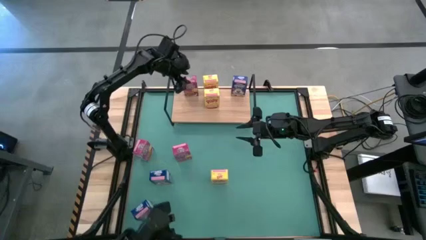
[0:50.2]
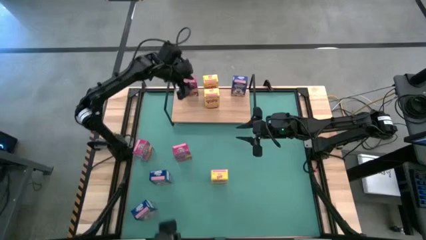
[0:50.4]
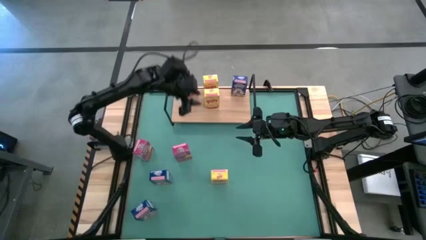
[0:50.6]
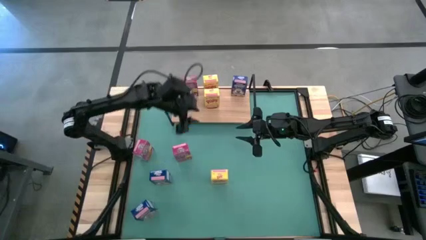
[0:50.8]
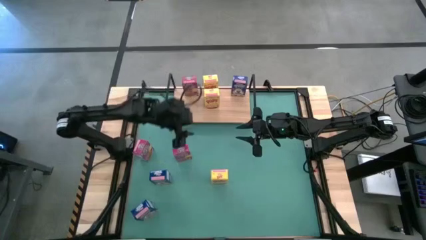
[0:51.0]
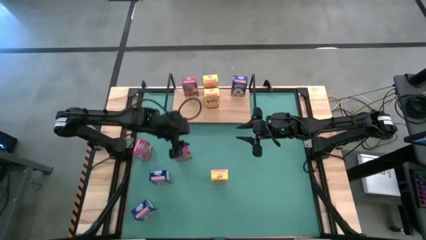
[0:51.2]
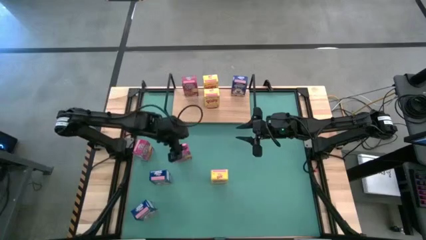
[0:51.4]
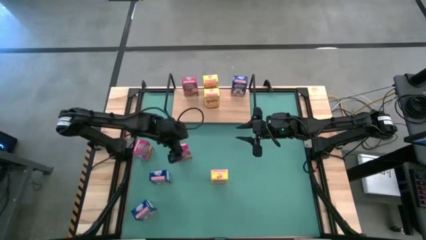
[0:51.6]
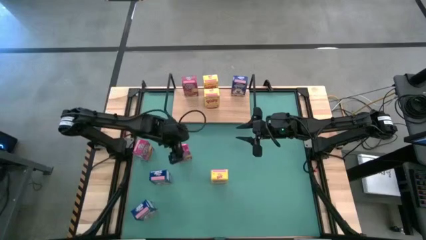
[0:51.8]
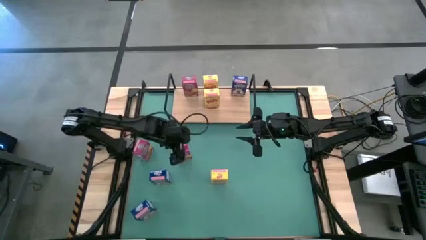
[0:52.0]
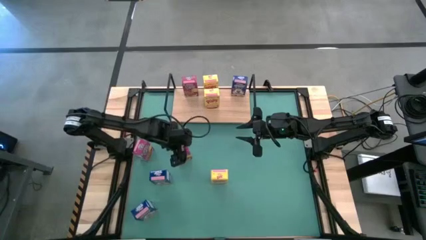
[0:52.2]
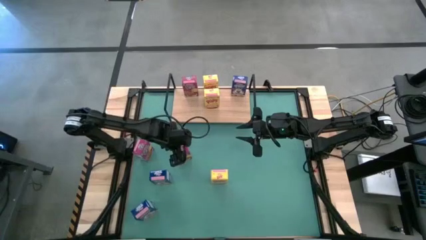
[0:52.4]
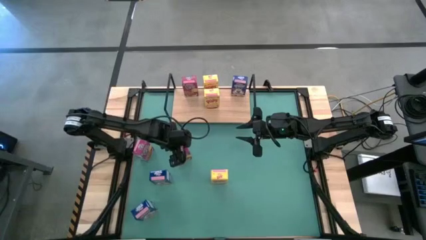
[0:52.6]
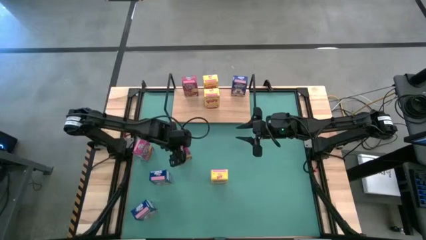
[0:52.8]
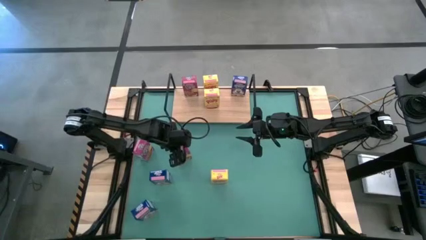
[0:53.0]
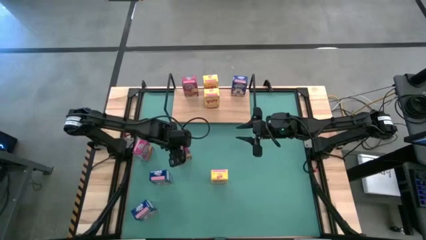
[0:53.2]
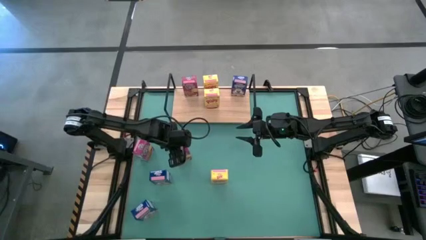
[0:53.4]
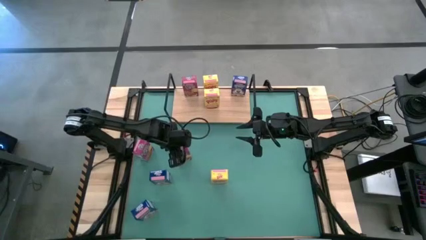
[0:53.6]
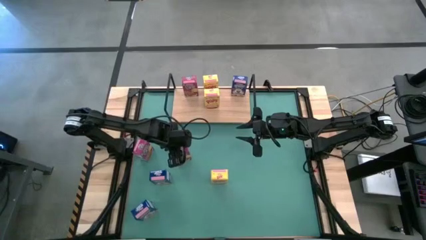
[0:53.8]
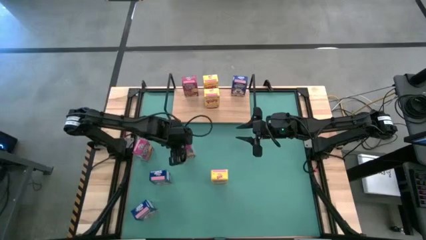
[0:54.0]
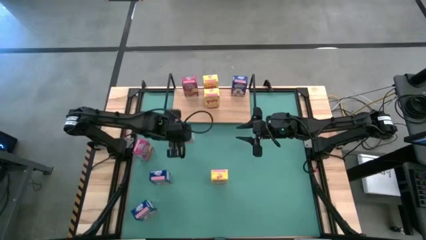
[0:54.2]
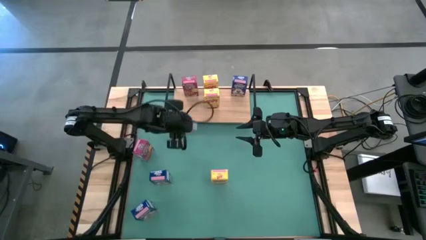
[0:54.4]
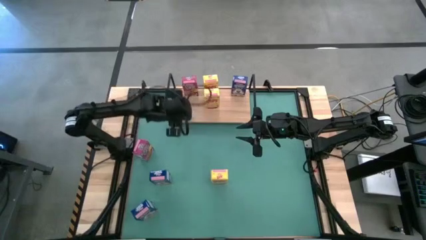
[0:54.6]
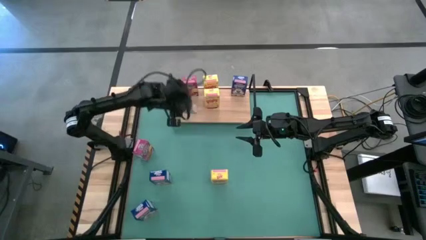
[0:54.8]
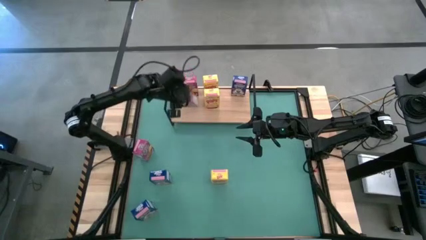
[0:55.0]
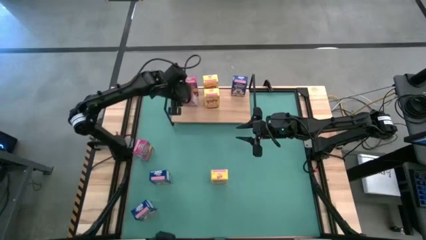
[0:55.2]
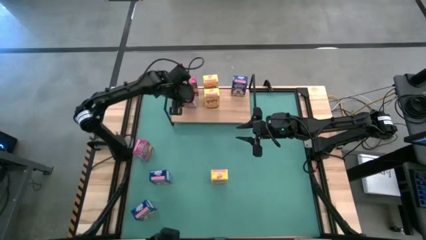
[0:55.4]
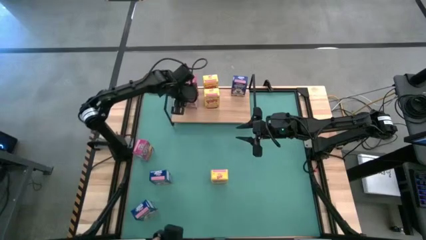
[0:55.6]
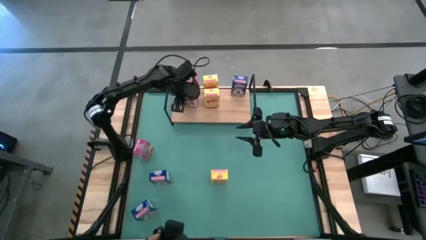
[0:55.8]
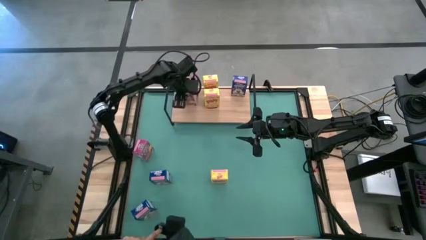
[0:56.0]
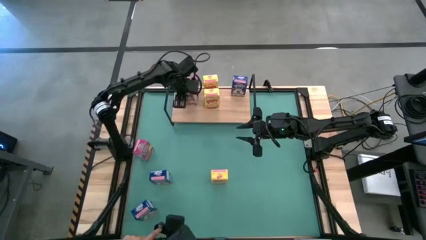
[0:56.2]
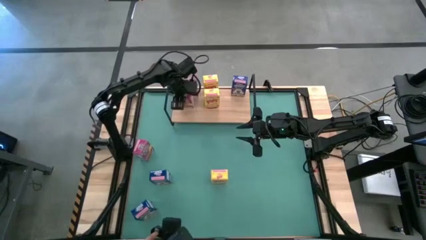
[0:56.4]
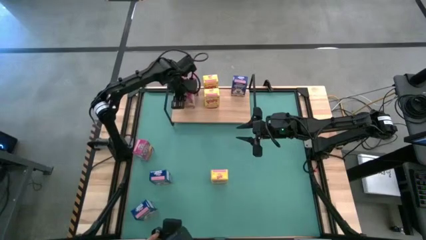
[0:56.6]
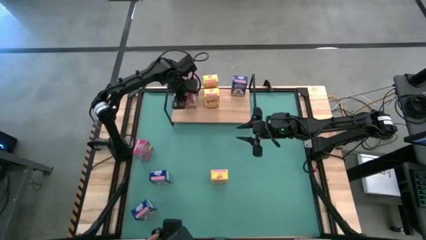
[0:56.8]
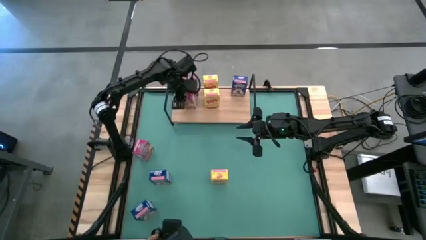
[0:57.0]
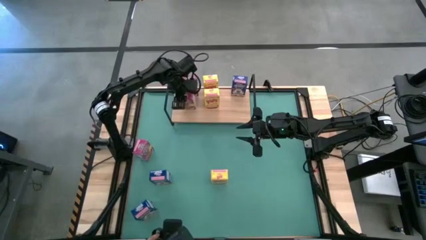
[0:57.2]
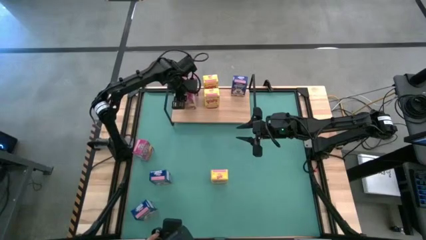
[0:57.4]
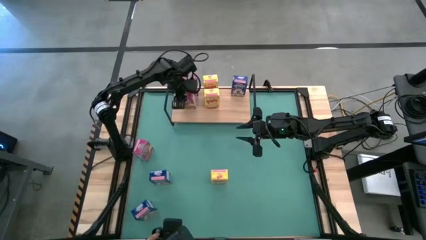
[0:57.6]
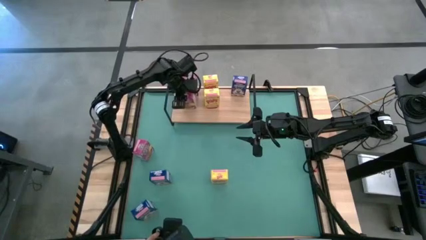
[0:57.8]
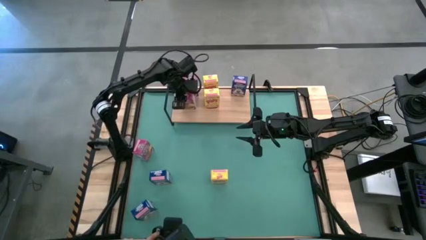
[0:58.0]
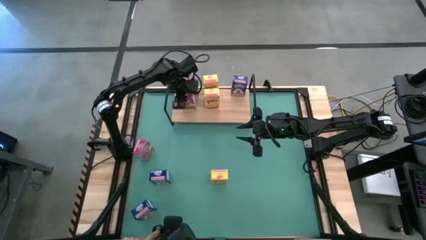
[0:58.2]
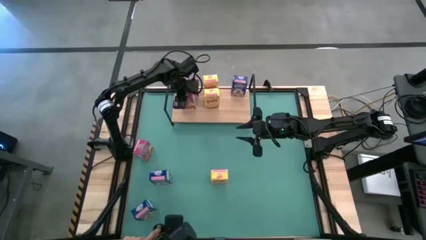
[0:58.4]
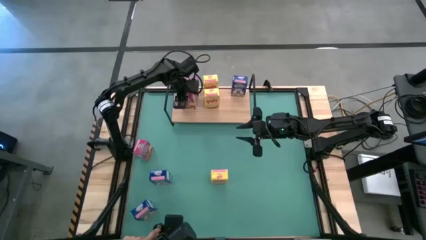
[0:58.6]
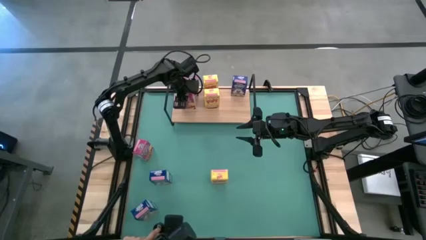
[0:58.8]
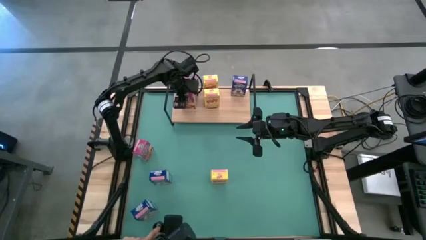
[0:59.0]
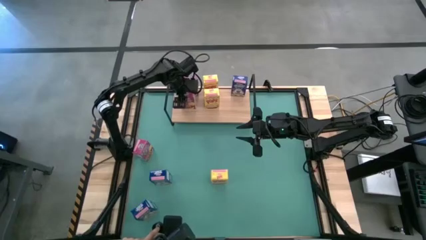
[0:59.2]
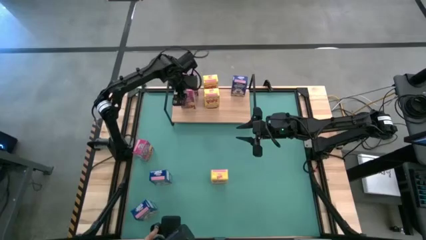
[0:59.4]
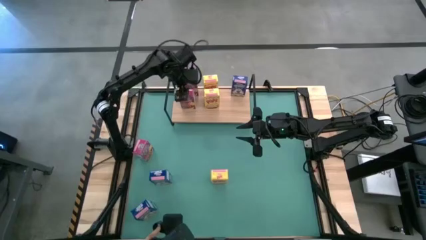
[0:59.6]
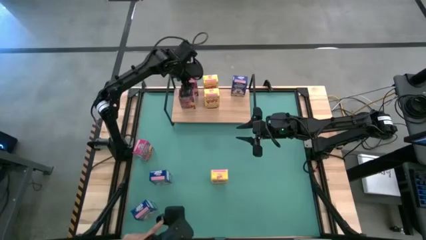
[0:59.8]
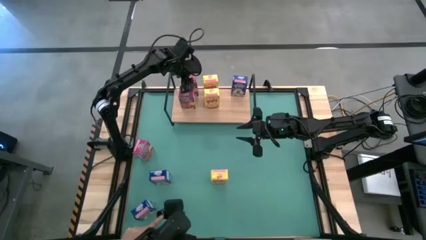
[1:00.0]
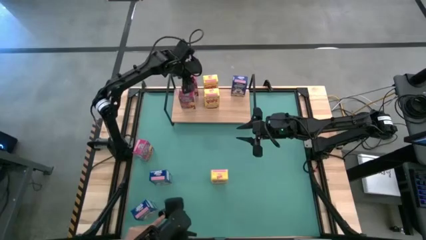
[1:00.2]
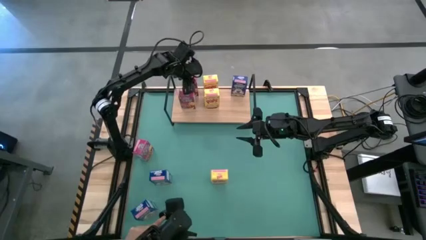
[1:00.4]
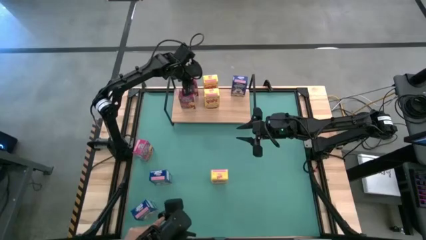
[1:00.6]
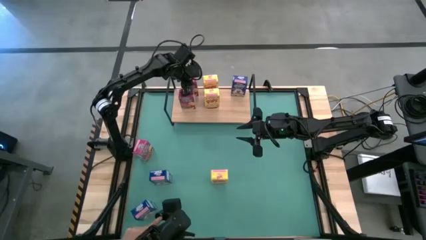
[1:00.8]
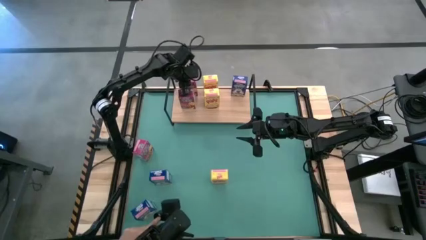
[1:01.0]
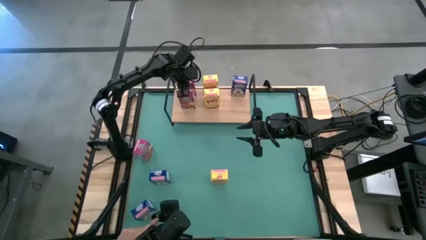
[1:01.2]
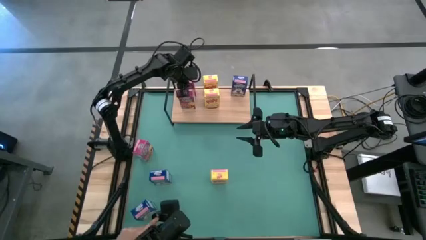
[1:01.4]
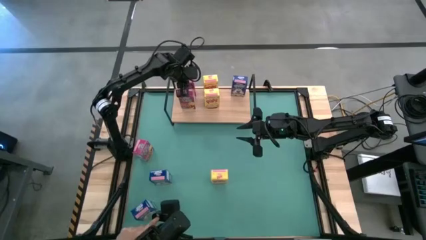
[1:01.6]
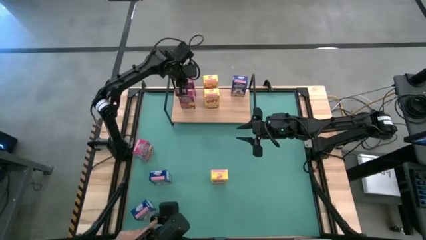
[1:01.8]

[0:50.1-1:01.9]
Task: Stack cereal on shelf
Put the right pink cereal box on the shelf aligned with the other pink cereal box
